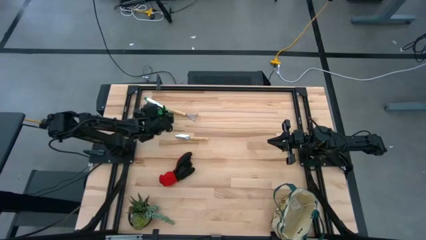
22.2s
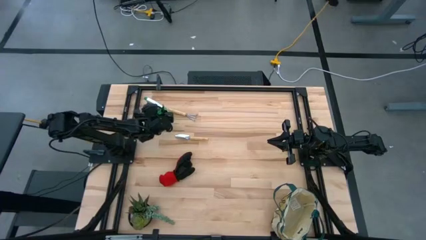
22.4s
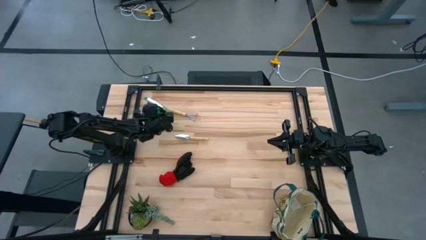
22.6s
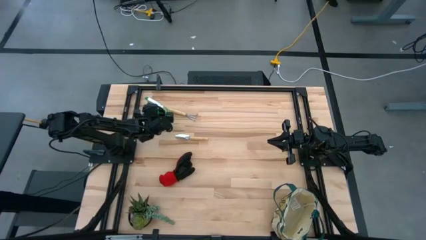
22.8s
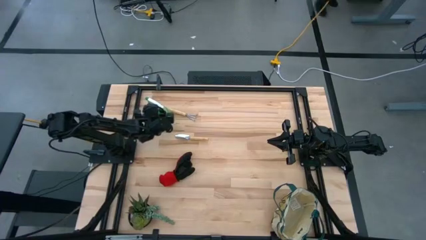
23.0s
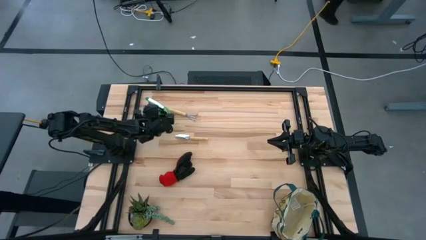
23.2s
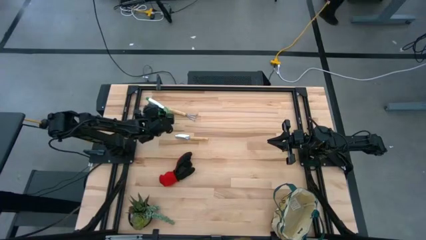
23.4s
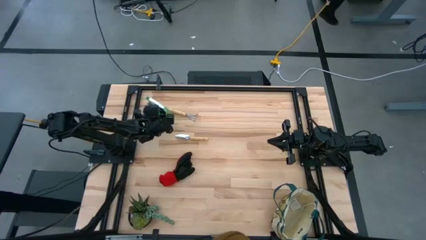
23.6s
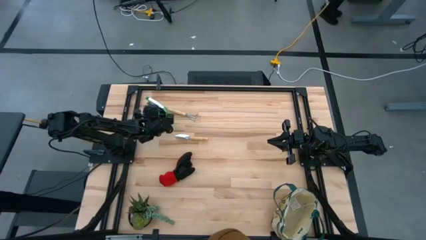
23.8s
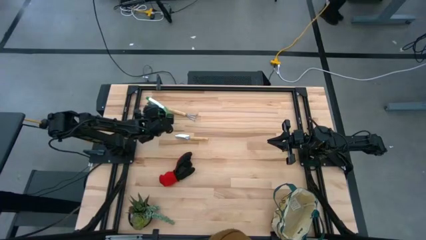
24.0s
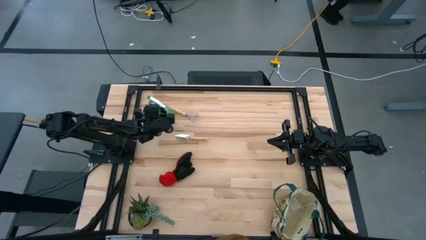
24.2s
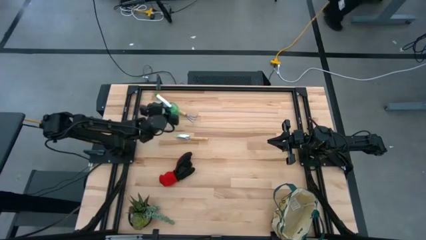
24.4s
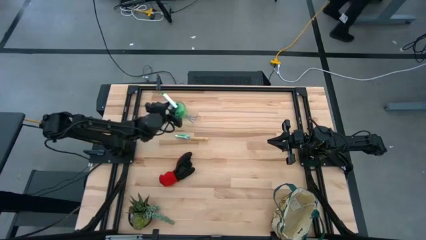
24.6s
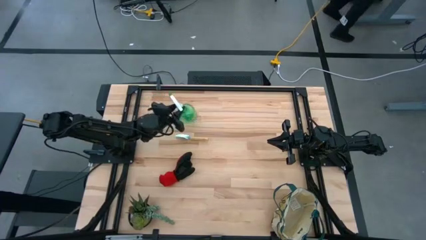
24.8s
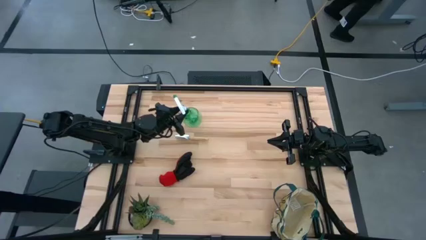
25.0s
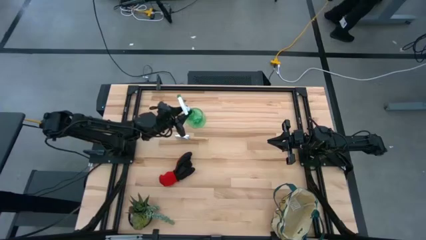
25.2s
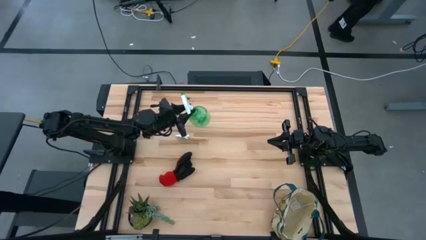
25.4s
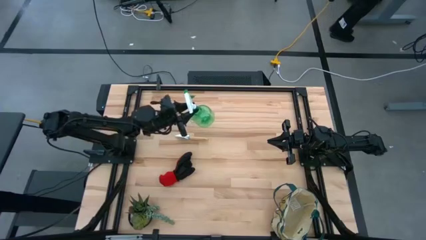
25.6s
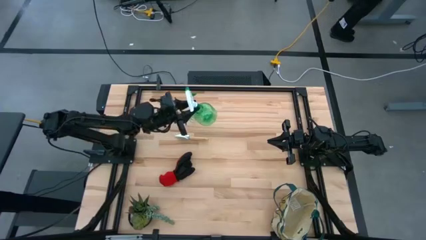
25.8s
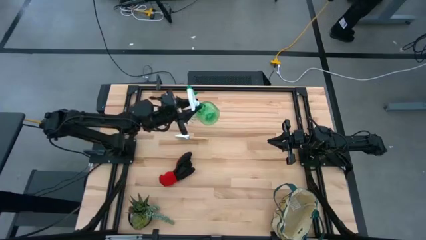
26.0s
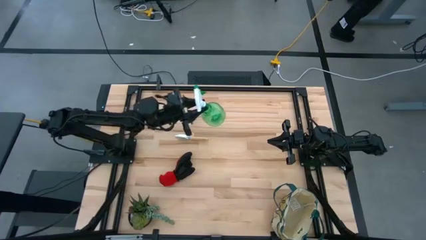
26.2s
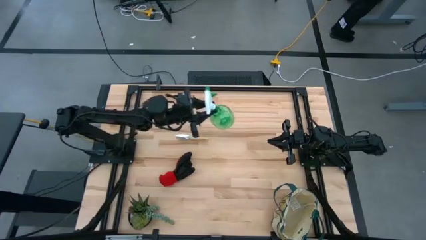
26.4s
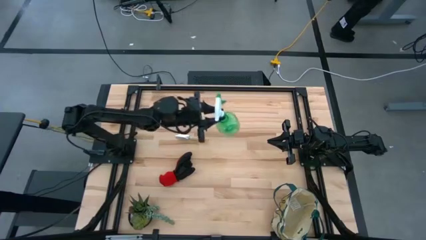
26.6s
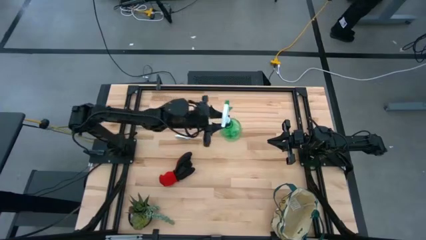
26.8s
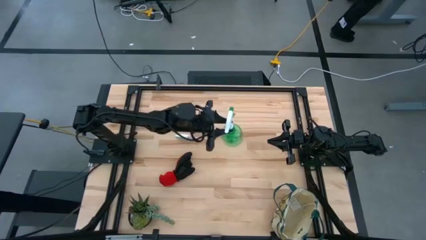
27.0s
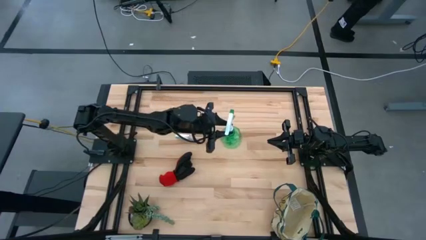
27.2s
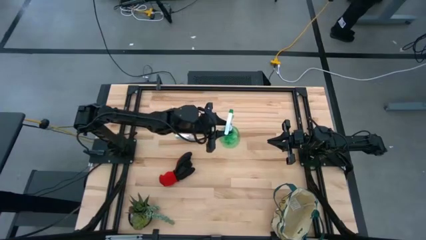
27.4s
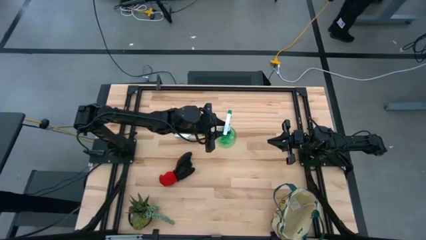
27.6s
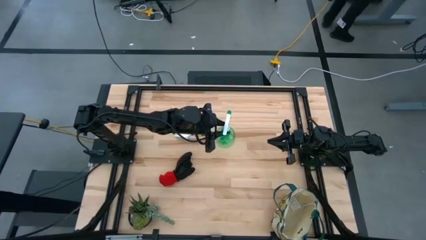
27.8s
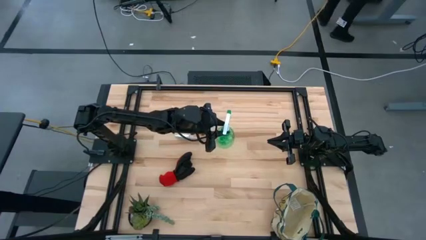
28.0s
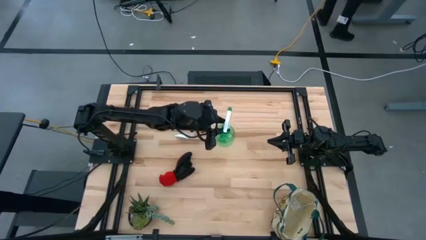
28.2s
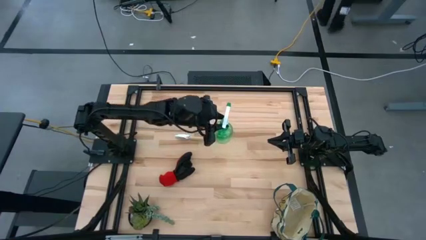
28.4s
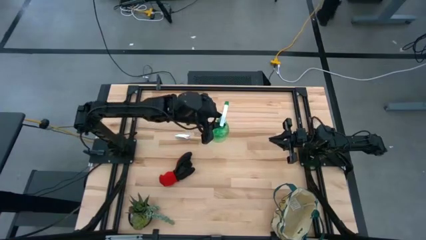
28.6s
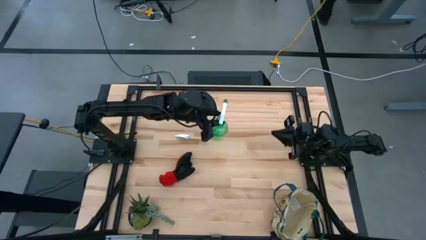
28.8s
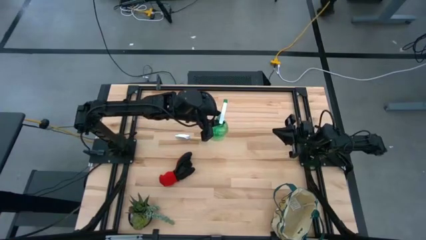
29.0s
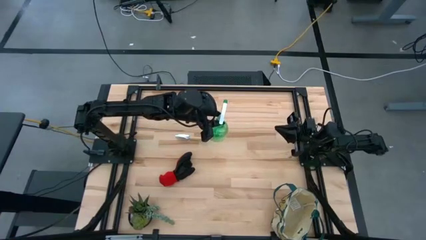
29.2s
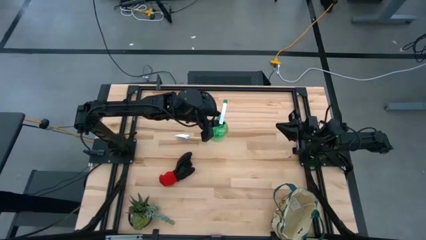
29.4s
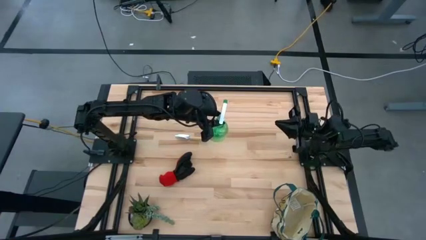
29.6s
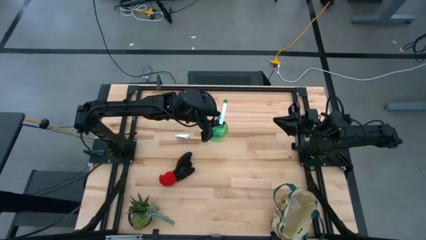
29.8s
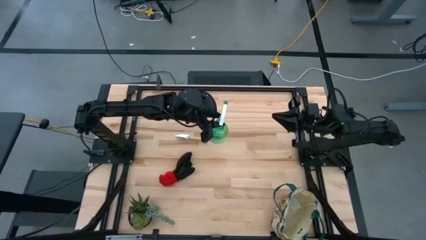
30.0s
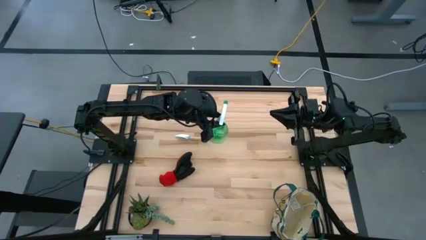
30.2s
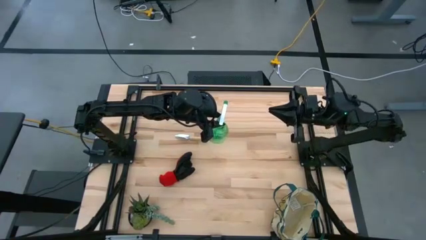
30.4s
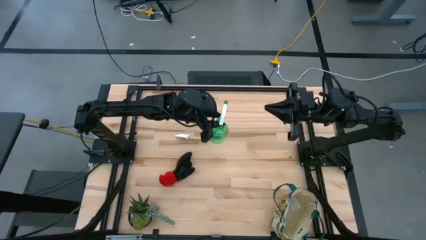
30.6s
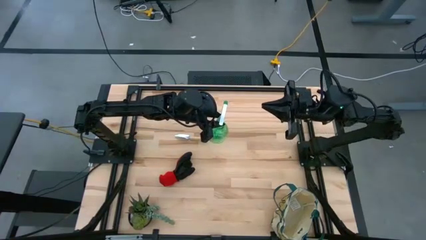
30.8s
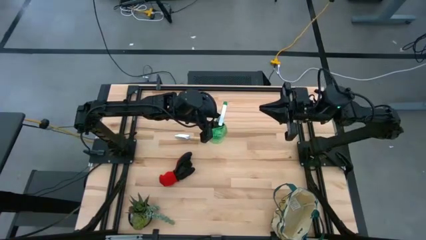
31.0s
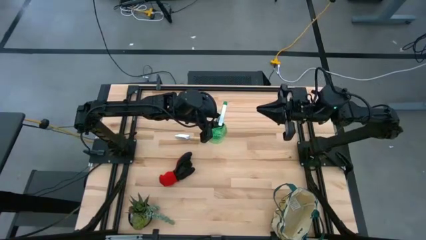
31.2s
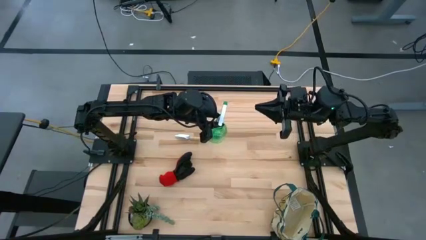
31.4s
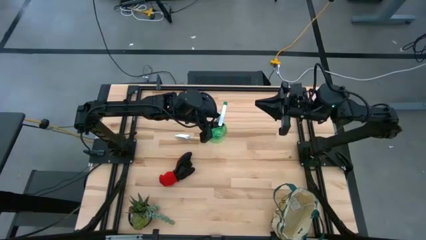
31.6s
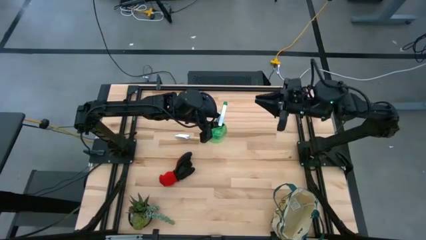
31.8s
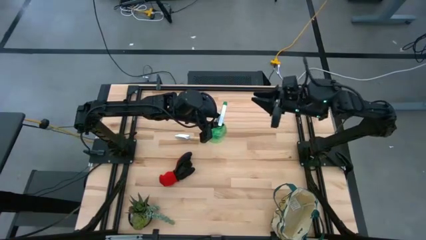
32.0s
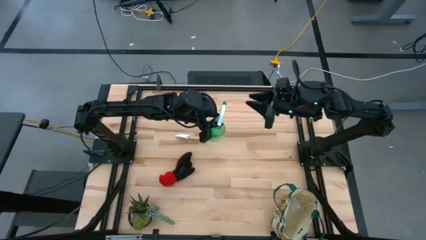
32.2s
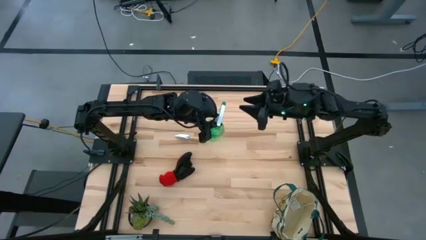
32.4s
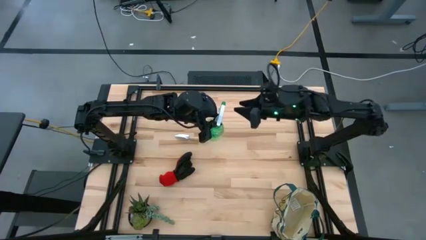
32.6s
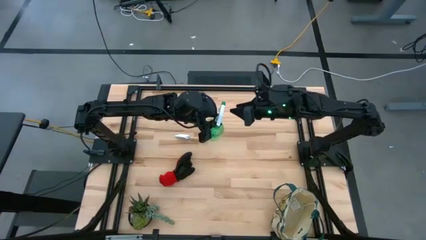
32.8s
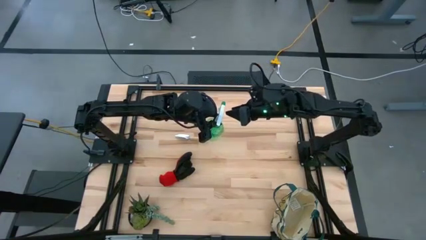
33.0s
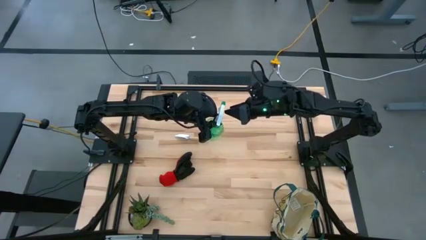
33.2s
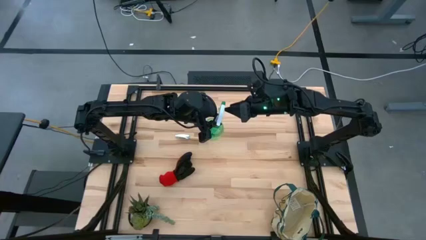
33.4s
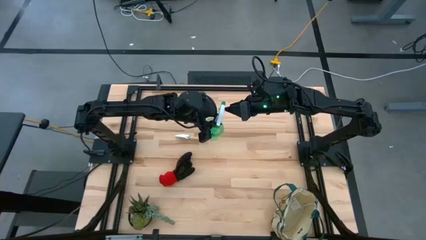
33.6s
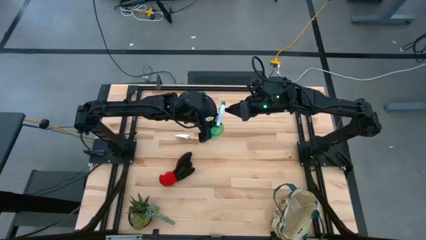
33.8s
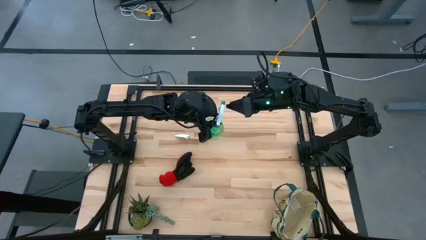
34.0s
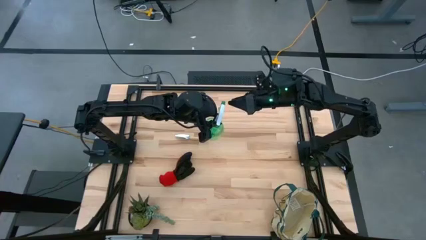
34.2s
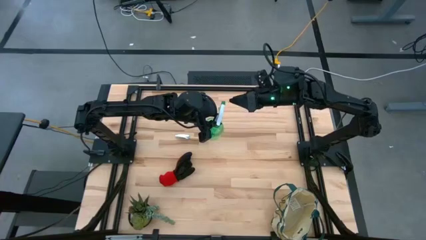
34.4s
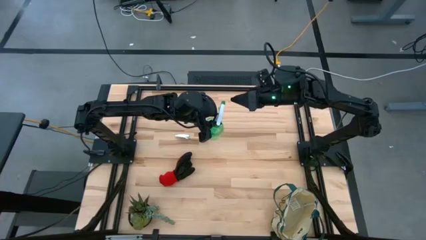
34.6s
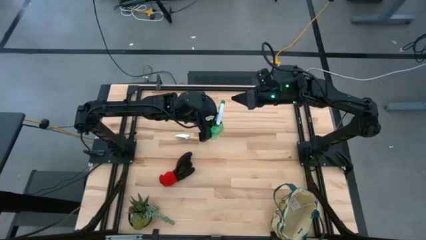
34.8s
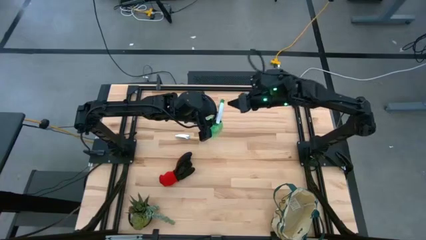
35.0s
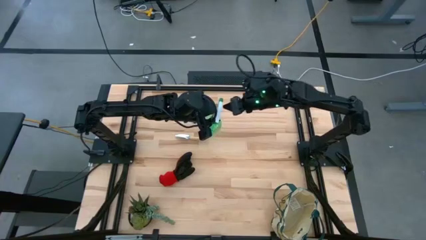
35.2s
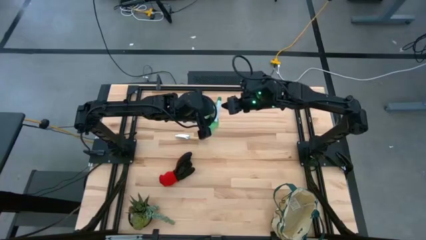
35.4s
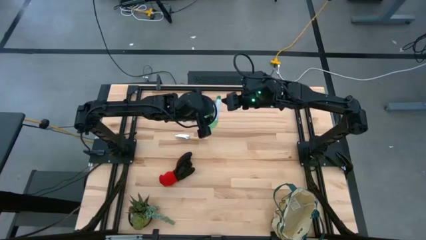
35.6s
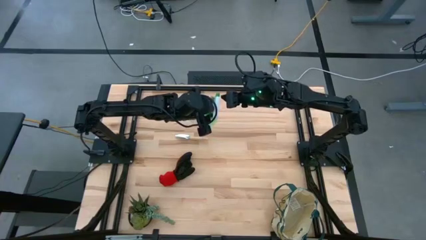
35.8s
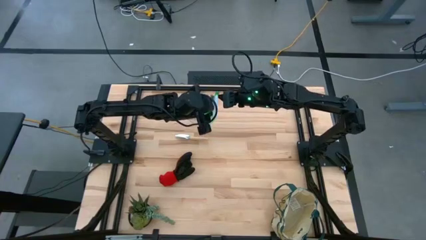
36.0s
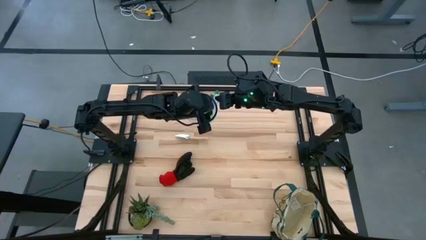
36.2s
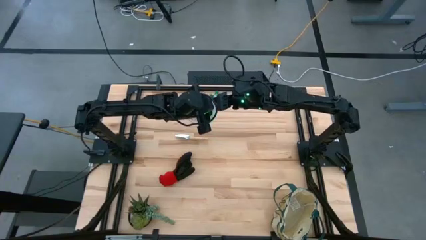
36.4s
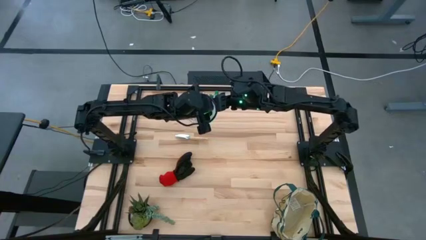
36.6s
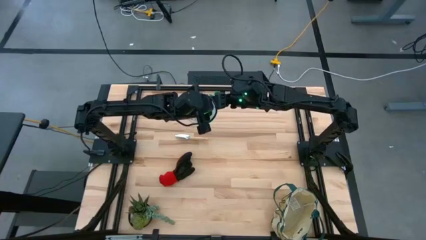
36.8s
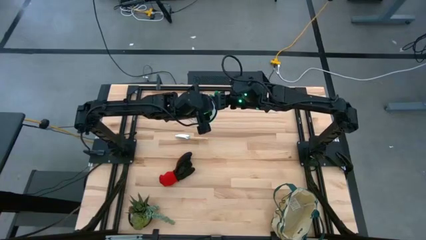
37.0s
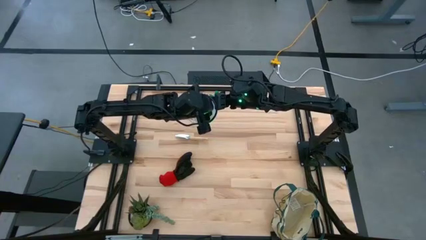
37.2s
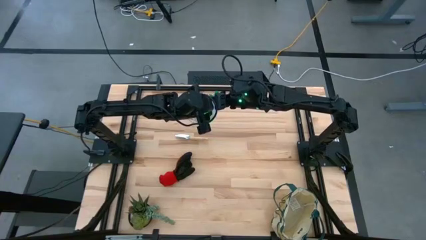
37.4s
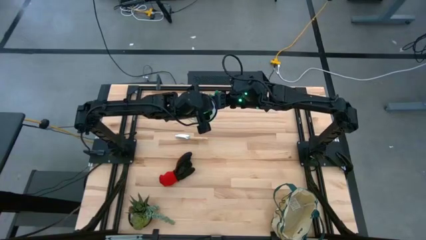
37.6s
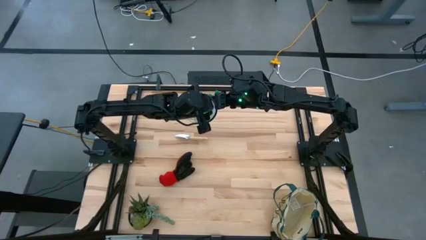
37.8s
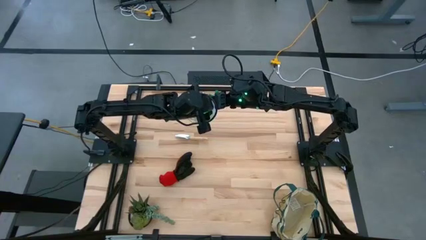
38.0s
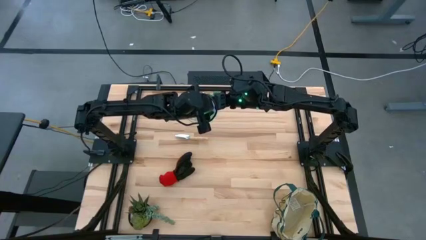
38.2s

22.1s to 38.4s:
Task: Pick & Place Garden tools in Gardening bag
Put the green spray bottle into the gardening bag

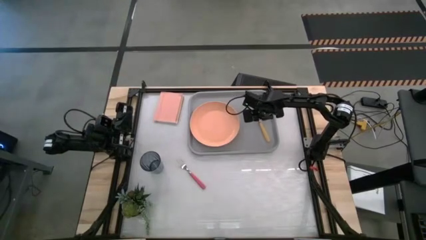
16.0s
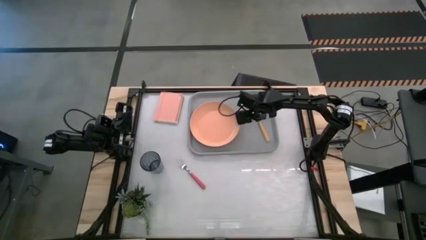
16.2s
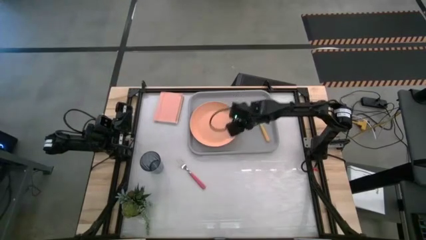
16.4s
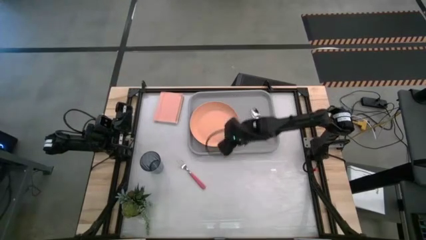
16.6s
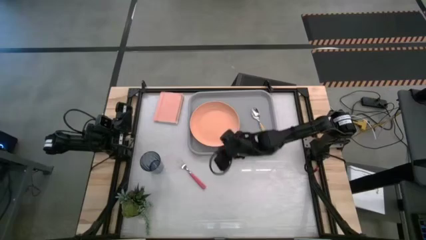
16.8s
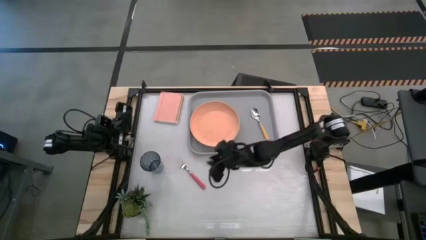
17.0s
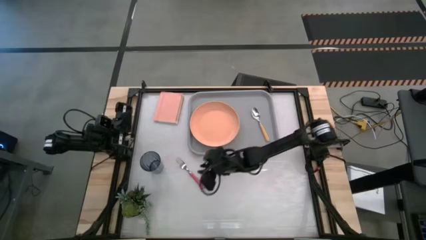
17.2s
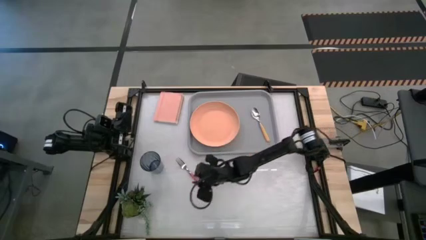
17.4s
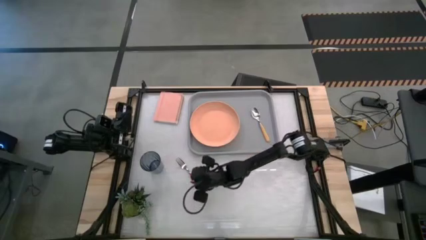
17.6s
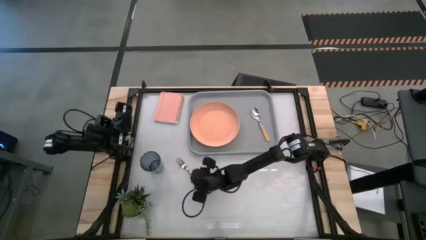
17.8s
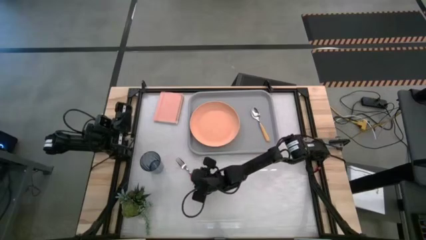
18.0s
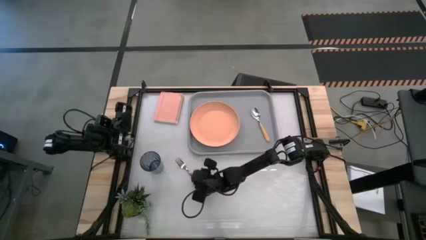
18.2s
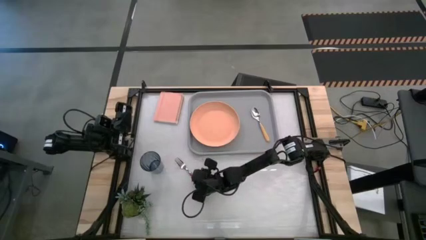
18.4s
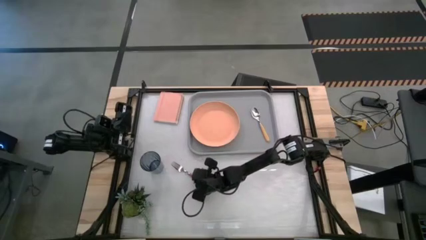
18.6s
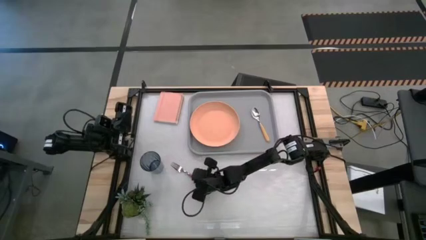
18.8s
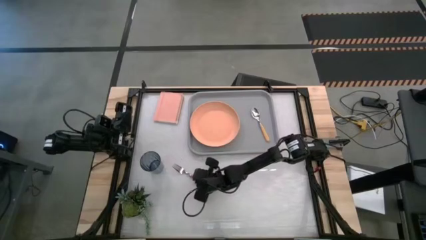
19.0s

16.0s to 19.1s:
Task: Pick and place plate/cup/fork/spoon on tray
Put the pink fork on the gray tray to the right of the orange plate
